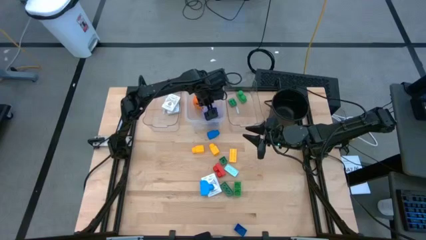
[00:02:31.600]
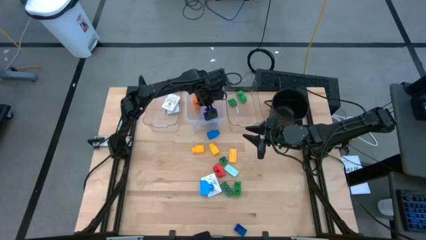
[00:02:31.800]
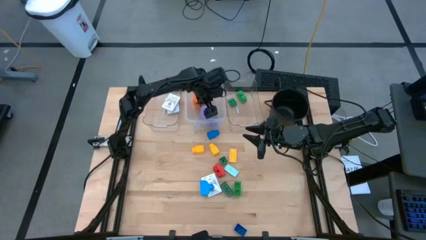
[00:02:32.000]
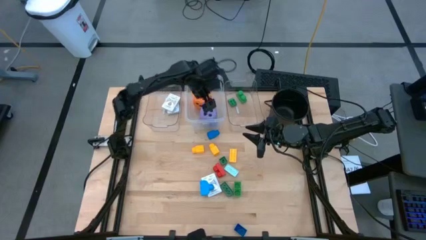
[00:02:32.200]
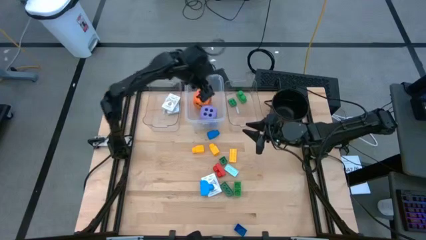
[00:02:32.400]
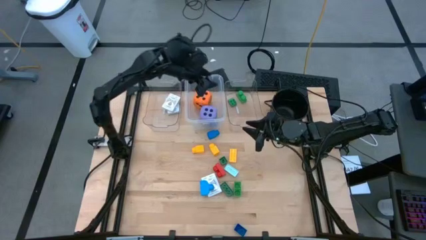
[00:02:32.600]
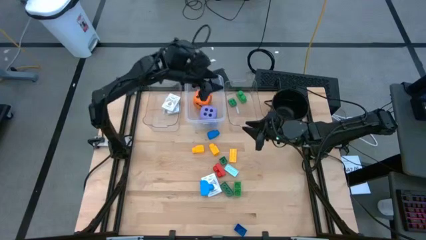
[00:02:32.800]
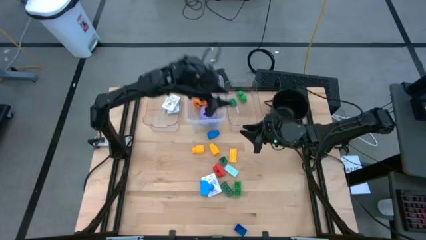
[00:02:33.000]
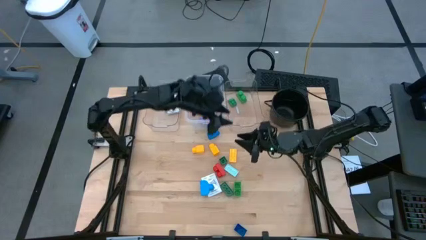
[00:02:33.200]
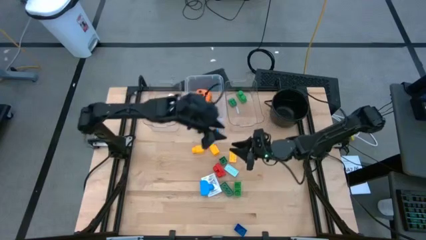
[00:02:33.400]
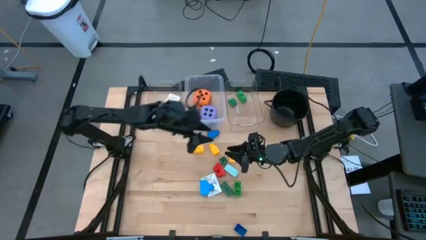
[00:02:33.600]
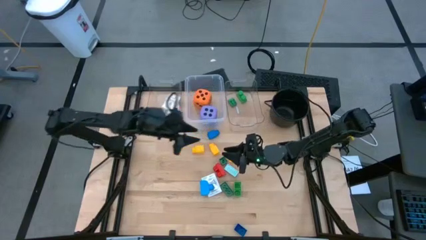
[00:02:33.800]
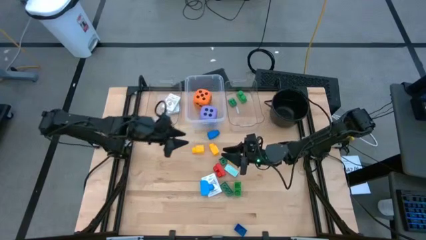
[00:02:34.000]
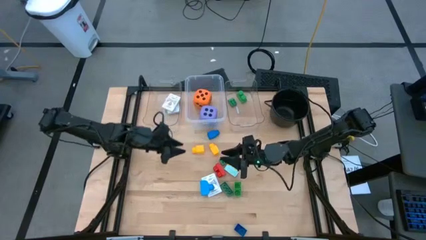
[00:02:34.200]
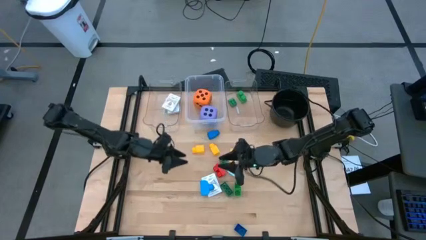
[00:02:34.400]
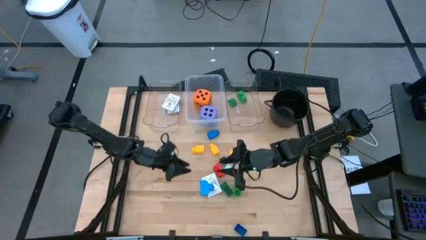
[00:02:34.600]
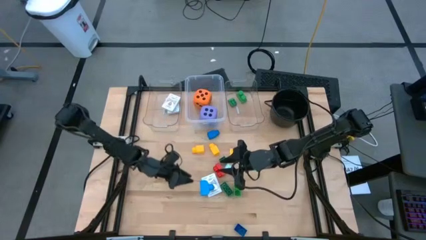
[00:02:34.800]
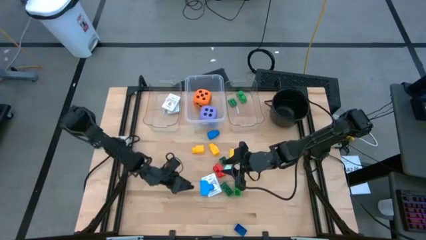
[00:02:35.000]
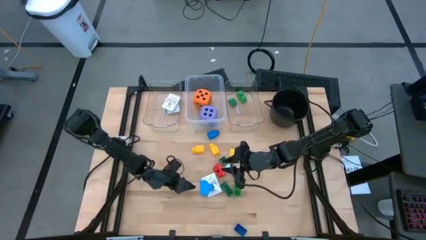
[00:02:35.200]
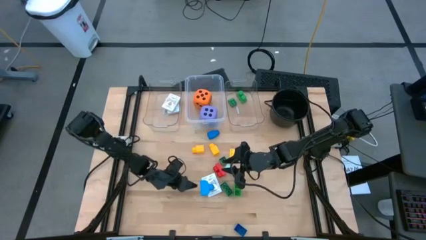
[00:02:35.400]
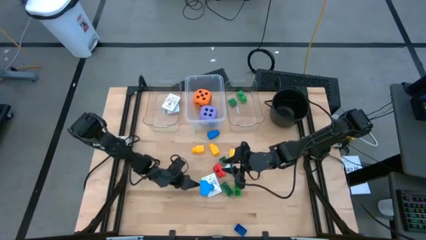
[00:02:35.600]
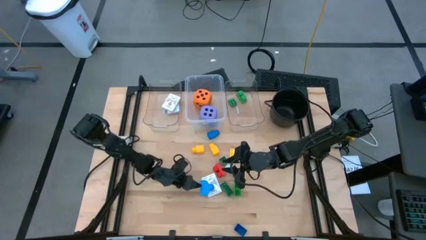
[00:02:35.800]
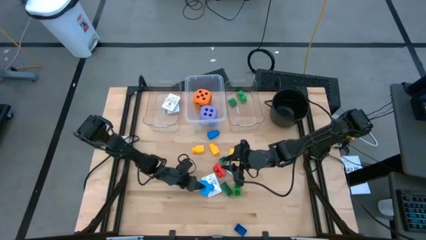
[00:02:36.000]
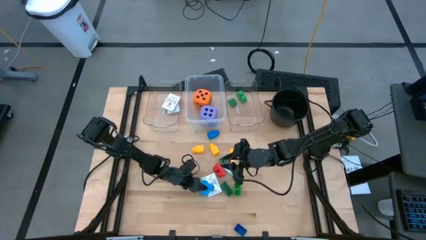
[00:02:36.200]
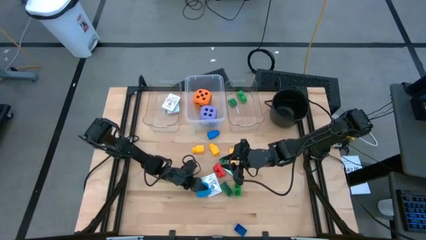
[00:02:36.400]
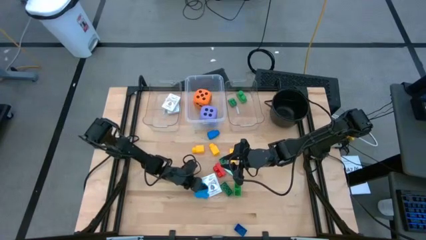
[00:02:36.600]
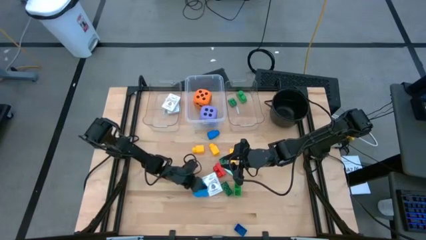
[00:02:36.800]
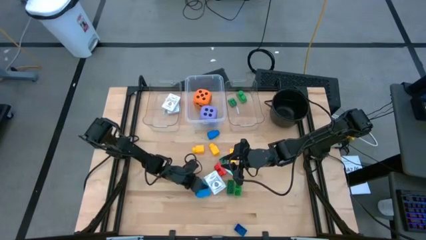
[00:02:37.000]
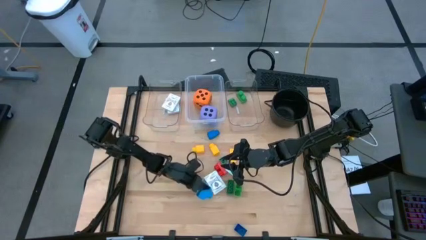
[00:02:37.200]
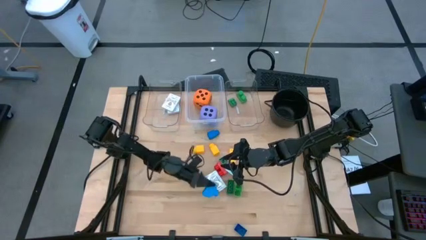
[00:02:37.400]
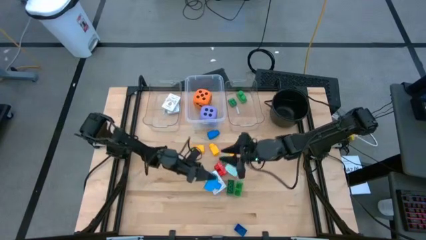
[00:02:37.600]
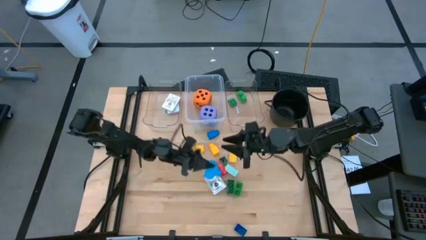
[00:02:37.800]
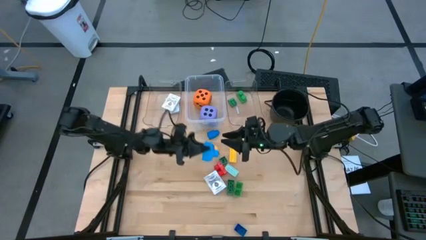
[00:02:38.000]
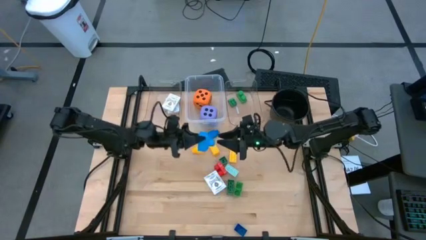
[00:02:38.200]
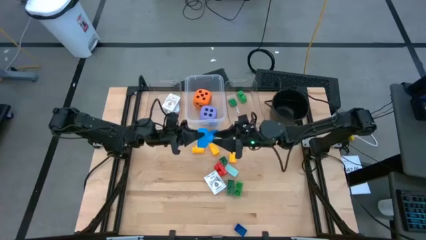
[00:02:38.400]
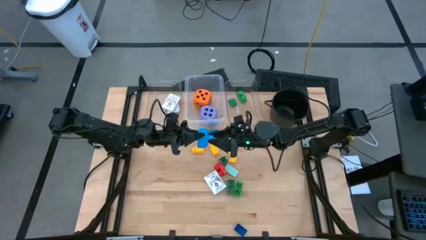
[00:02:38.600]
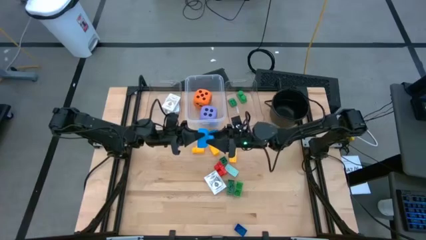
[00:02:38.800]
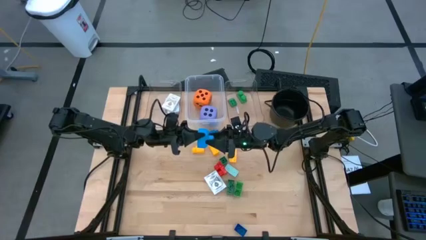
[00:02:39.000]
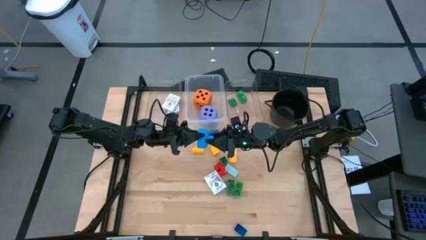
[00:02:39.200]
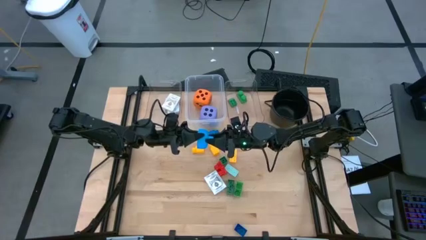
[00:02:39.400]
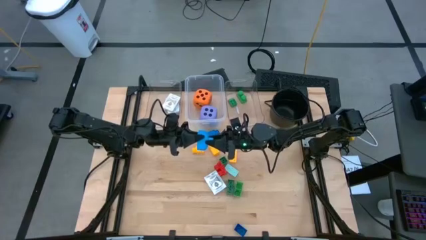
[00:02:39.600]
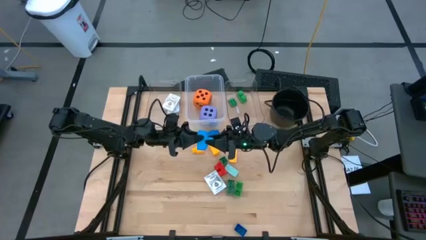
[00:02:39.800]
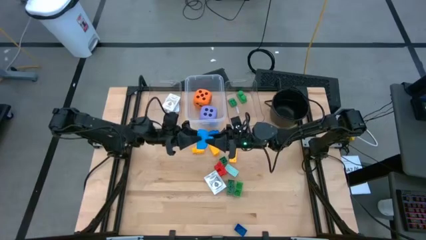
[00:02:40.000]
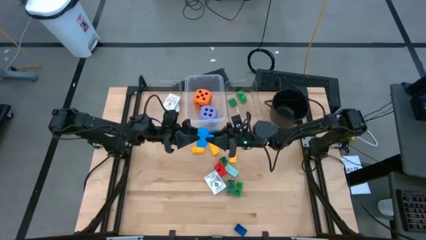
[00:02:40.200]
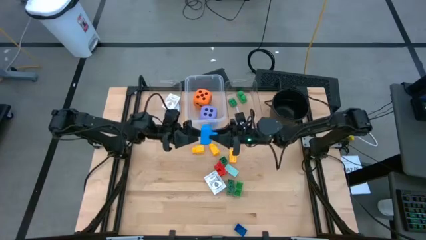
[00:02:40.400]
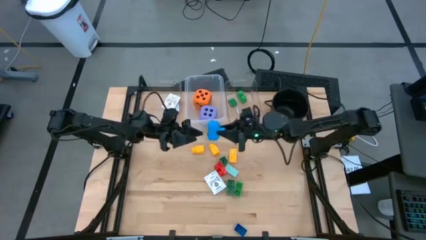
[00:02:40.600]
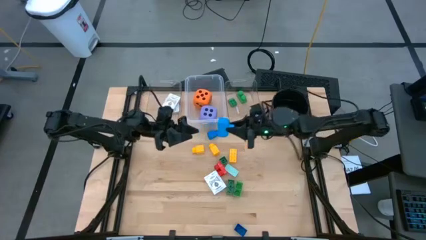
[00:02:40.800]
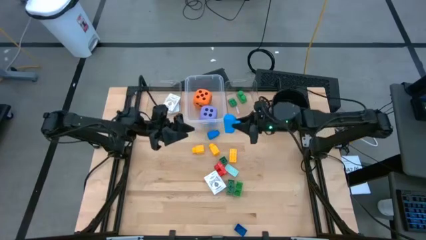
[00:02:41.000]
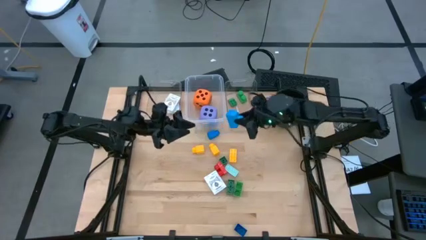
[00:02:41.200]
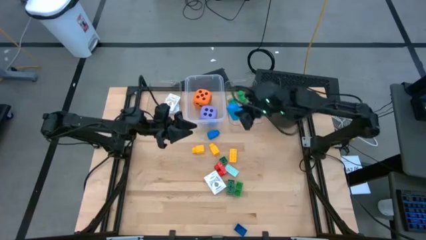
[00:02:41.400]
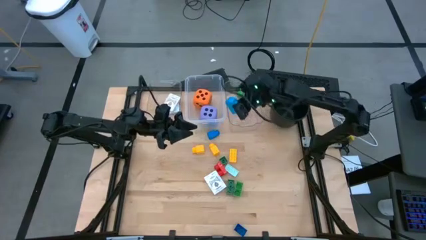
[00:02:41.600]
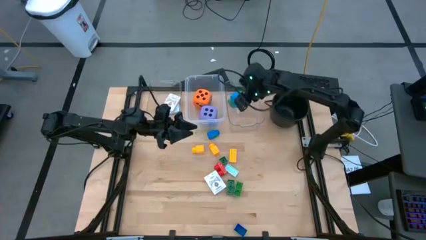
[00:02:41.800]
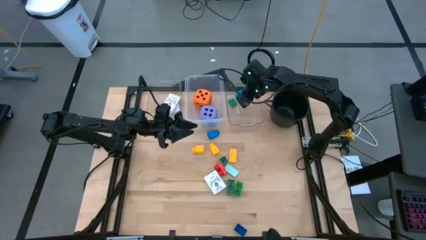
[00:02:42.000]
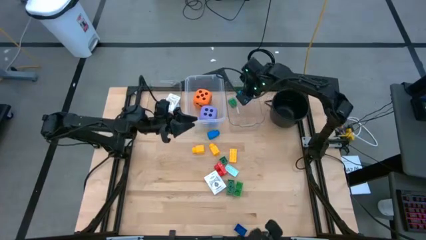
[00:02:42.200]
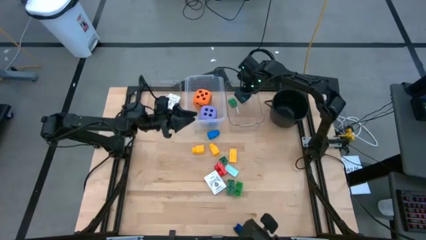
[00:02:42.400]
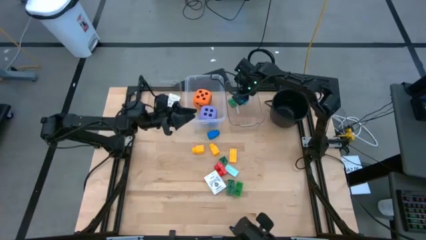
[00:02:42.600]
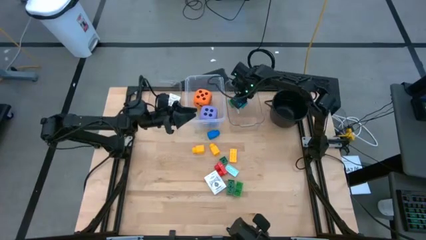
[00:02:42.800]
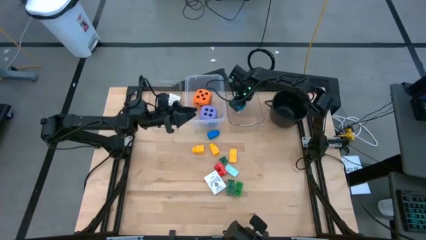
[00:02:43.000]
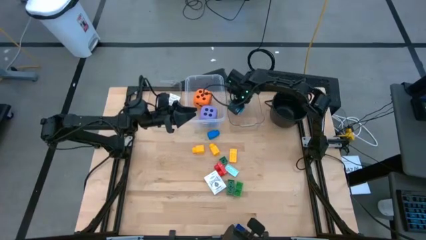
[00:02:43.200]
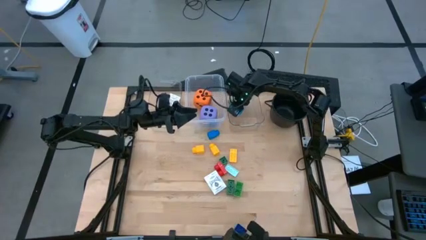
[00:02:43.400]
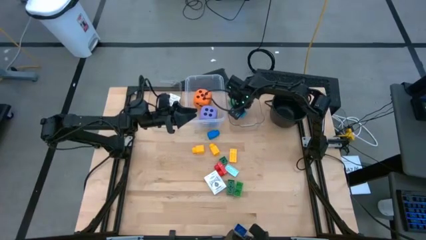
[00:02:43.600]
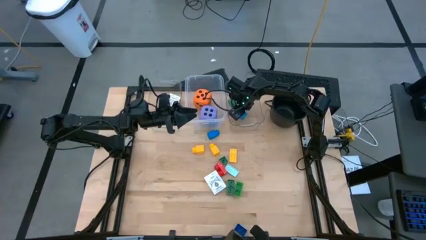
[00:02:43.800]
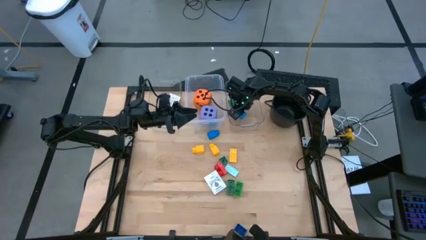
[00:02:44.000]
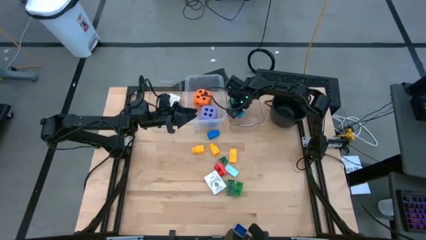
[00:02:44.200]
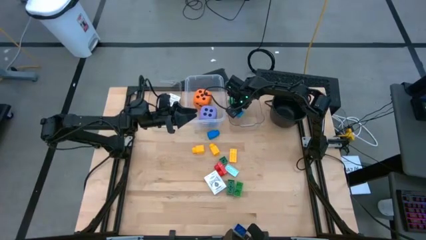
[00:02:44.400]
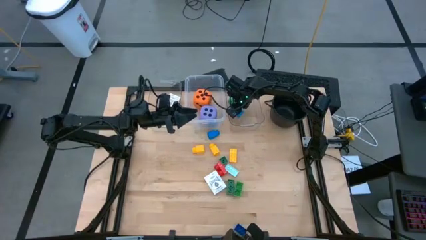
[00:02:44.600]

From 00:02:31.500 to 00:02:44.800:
Task: Pick & Place Toys
Put the light blue game piece into the right transparent bin
